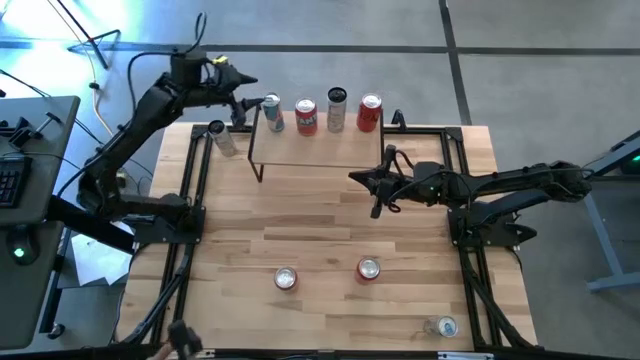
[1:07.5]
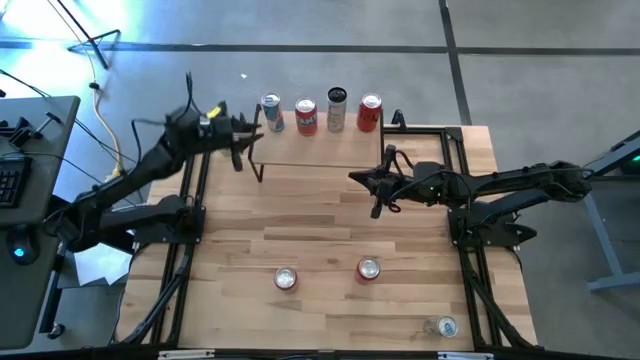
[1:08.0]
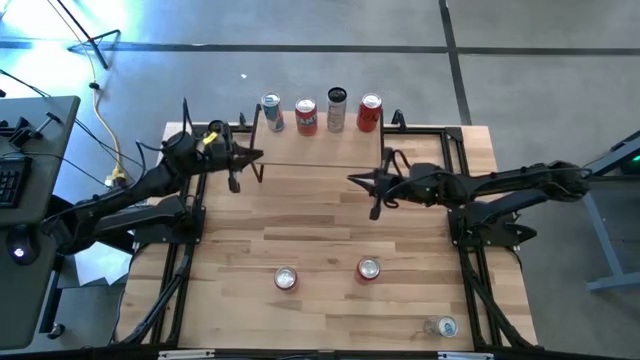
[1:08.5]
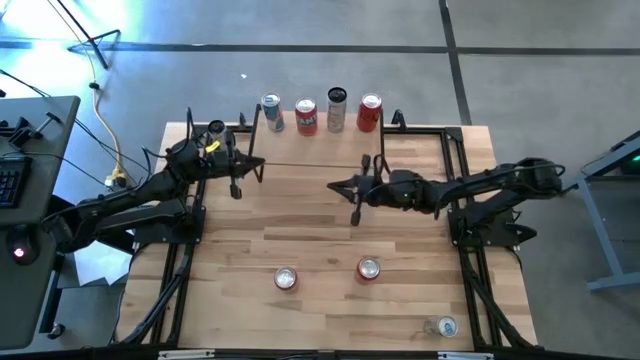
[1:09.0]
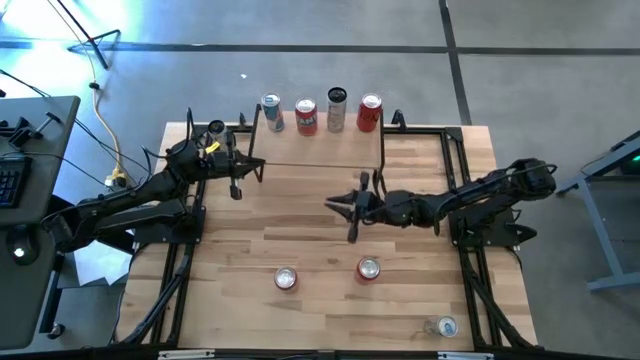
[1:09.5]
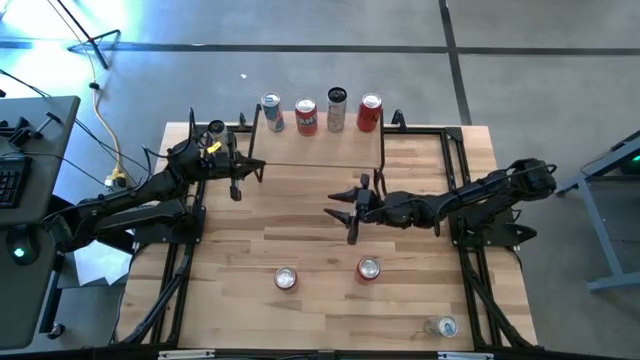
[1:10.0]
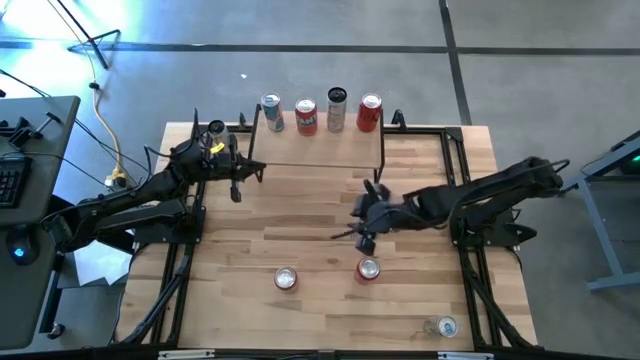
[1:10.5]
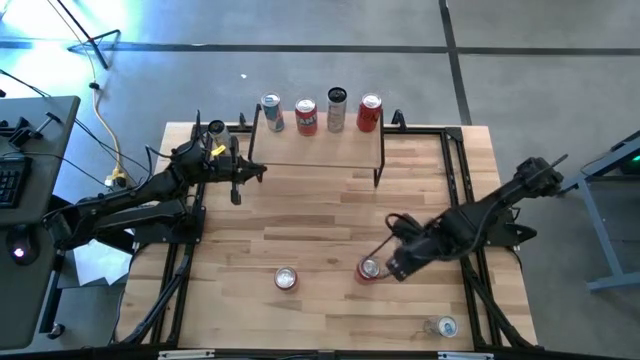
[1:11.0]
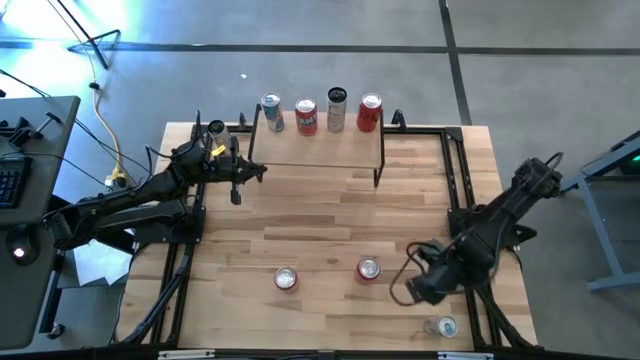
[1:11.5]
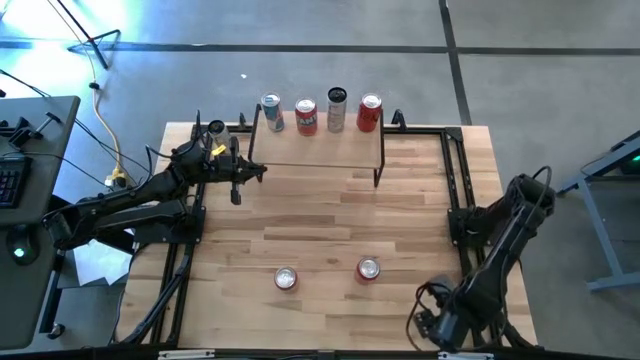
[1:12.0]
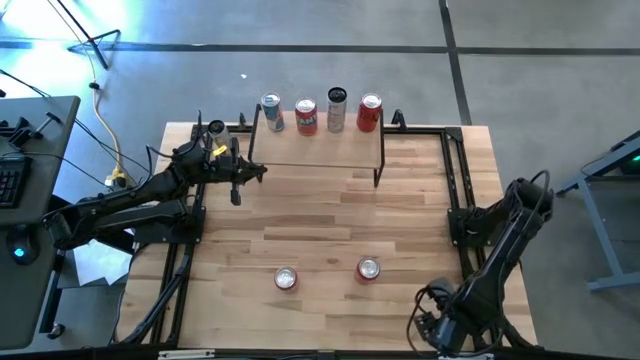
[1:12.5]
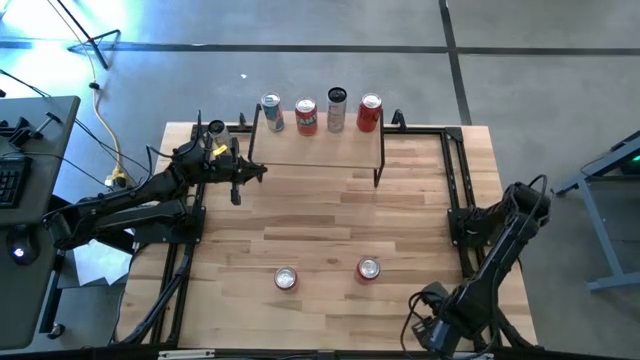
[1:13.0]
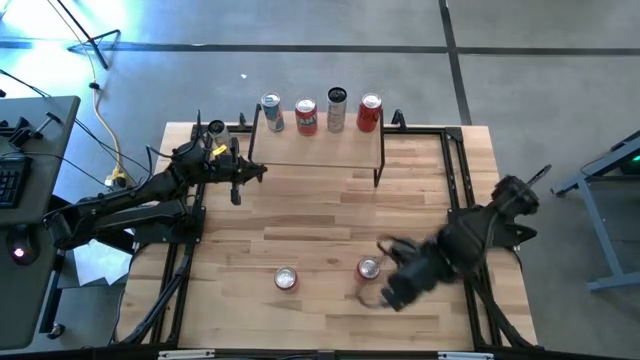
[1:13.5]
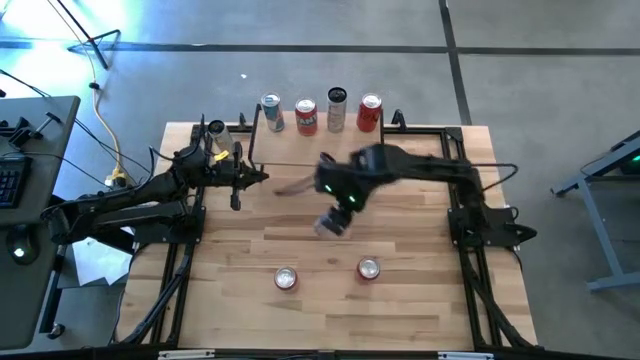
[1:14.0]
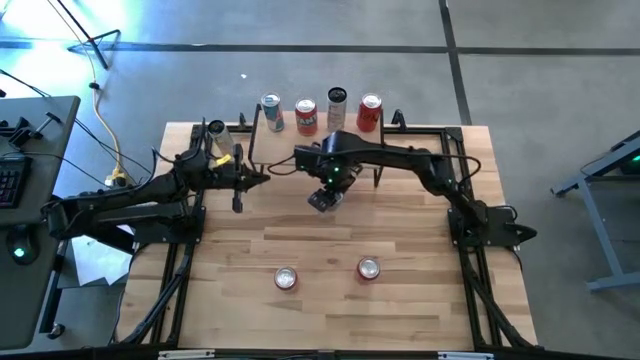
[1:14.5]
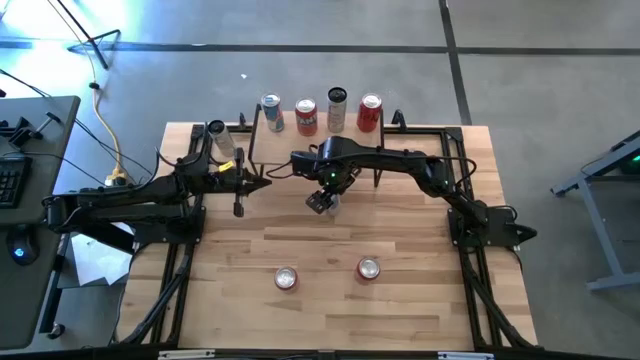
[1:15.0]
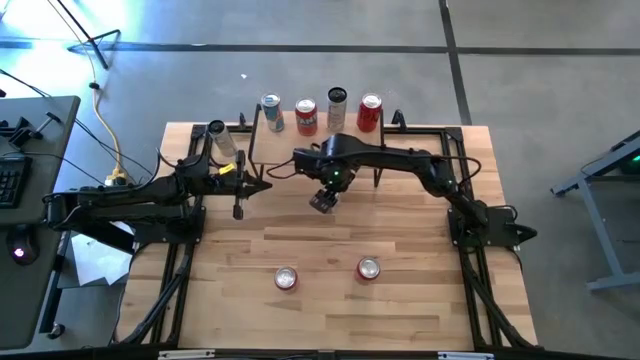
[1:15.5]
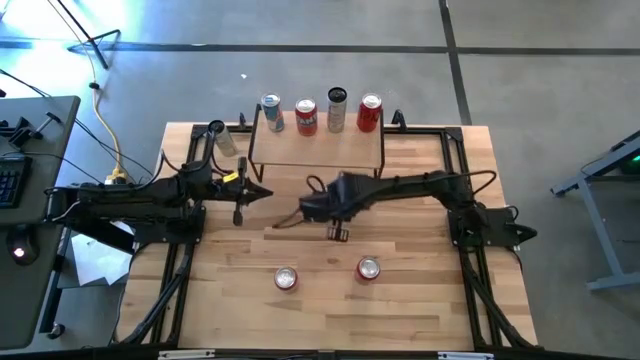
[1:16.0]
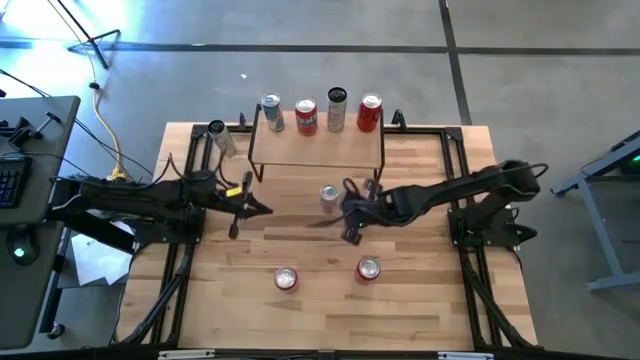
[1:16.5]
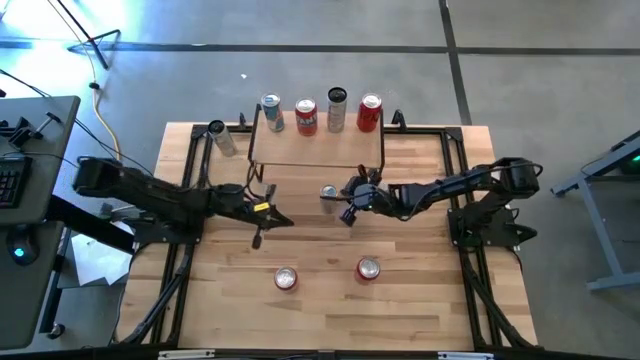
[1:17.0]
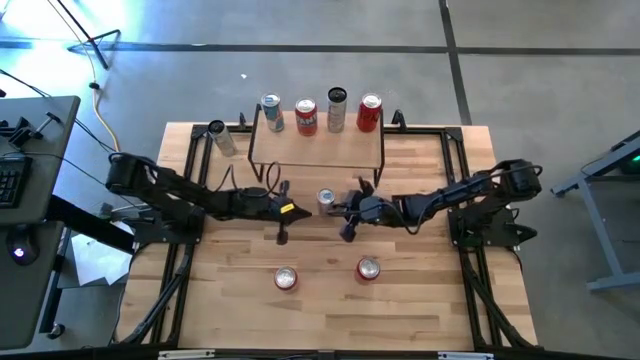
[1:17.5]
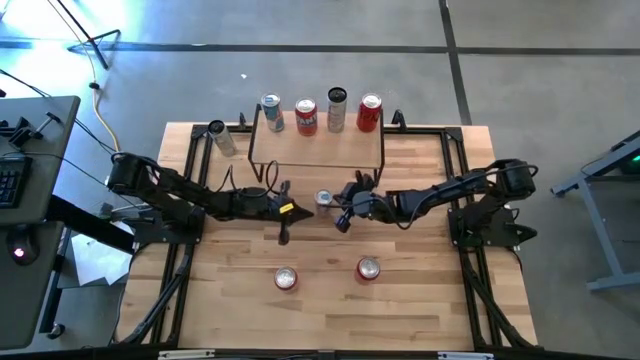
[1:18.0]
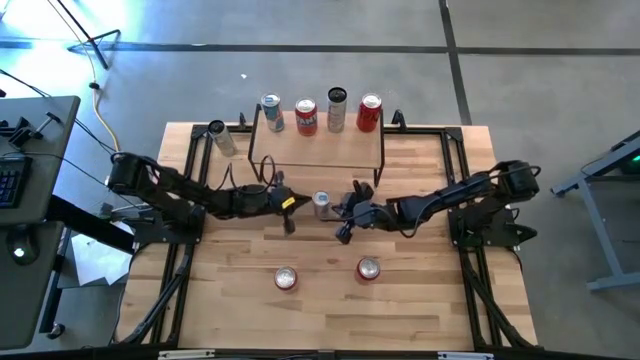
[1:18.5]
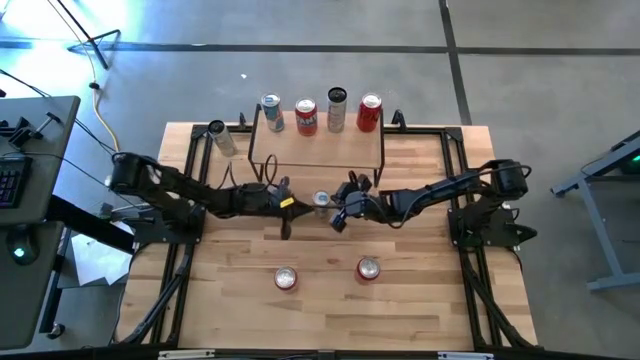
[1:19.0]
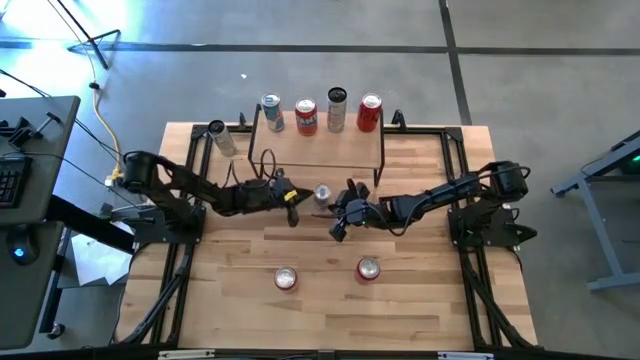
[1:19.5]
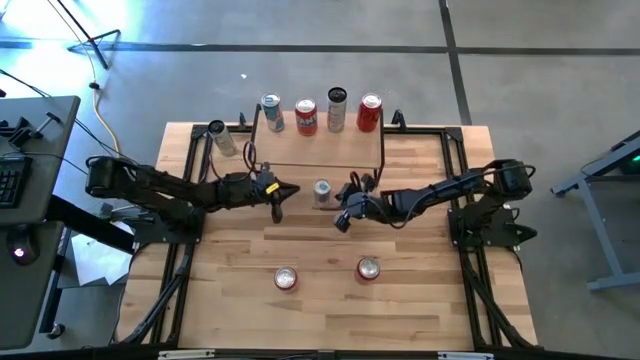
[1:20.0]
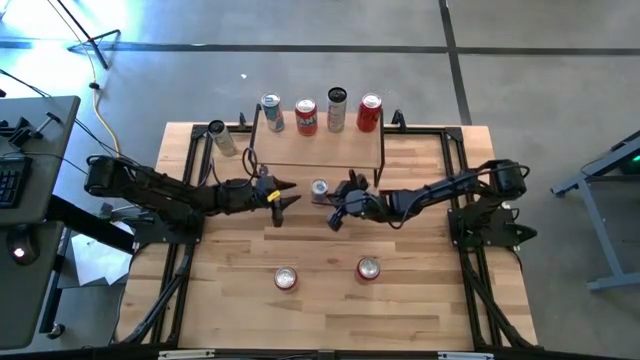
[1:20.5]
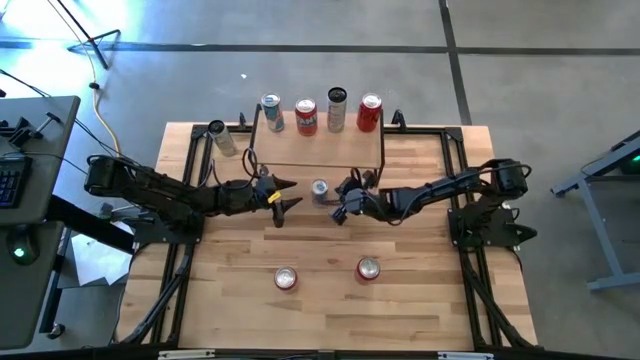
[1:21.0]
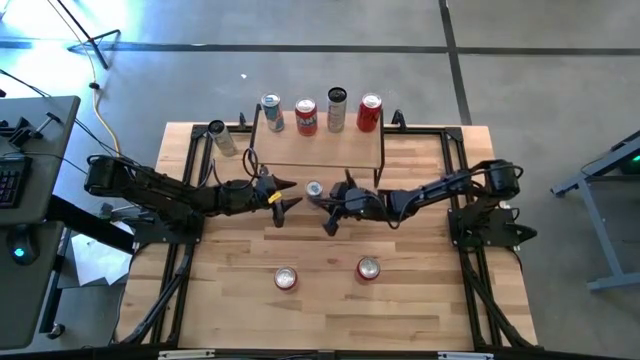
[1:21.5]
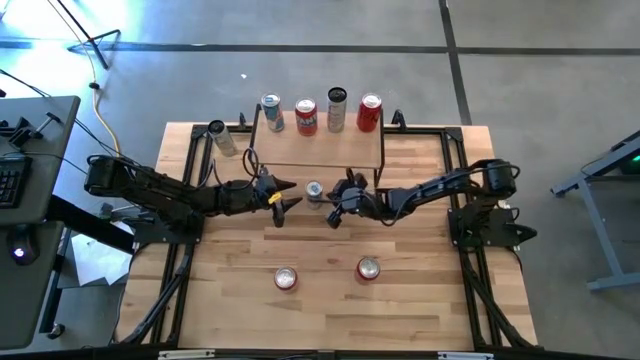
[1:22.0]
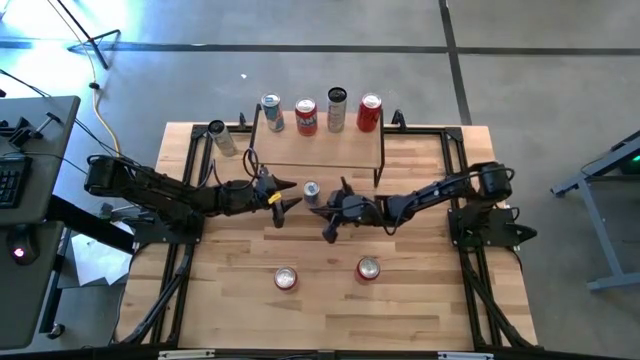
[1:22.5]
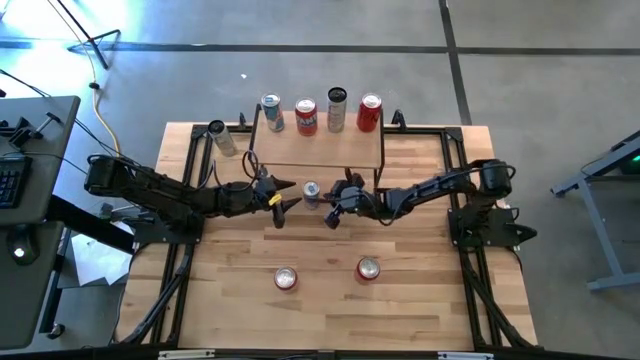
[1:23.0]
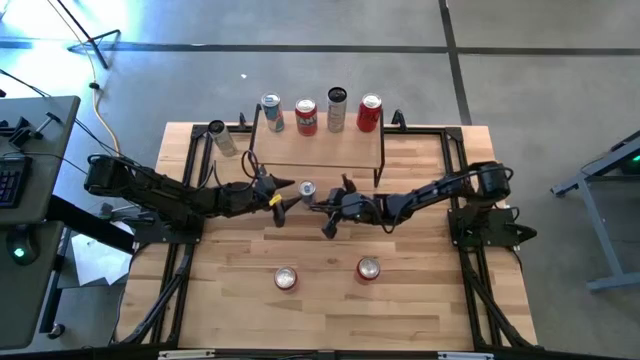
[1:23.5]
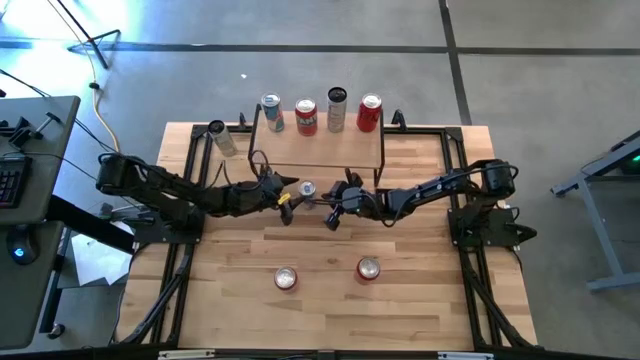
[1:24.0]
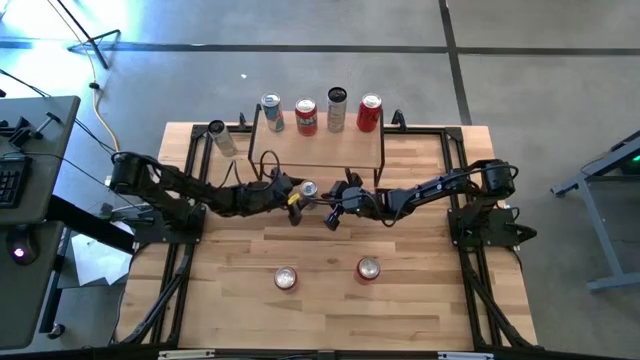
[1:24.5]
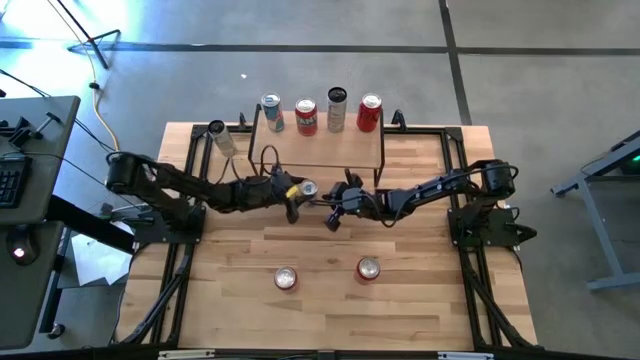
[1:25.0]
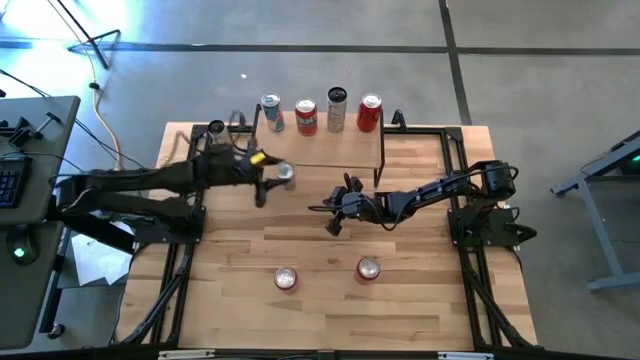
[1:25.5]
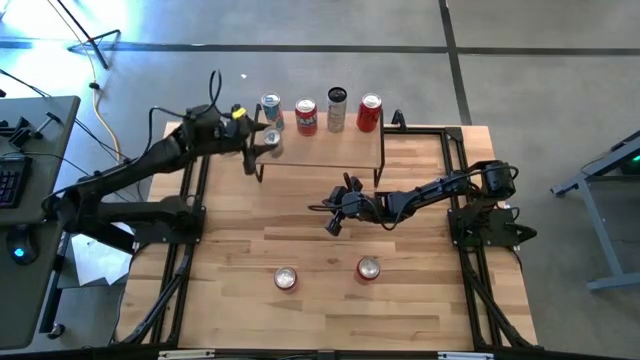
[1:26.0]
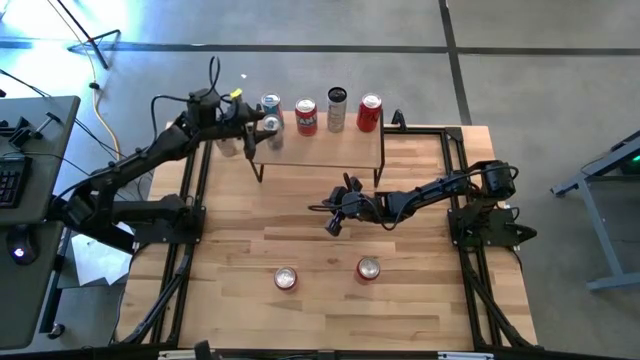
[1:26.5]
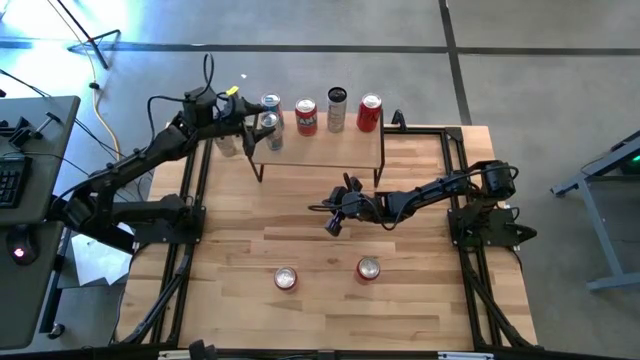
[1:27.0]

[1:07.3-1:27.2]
Task: Place canned beverage on shelf
Put the blue soda can on the shelf aligned with the other blue soda can

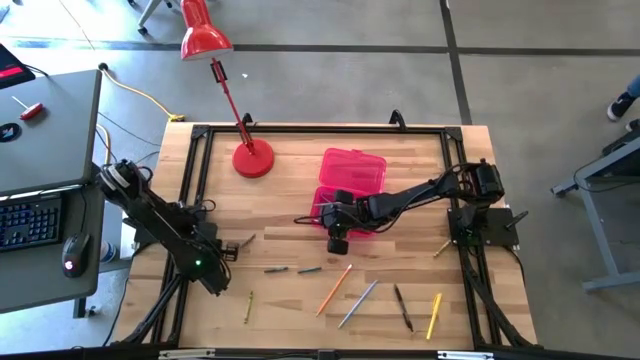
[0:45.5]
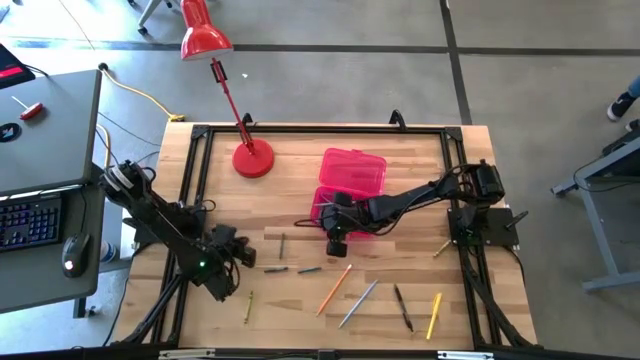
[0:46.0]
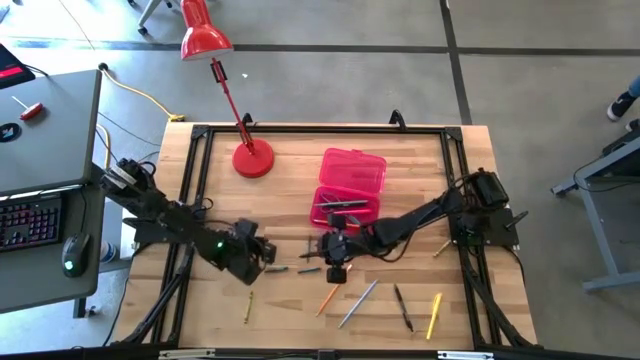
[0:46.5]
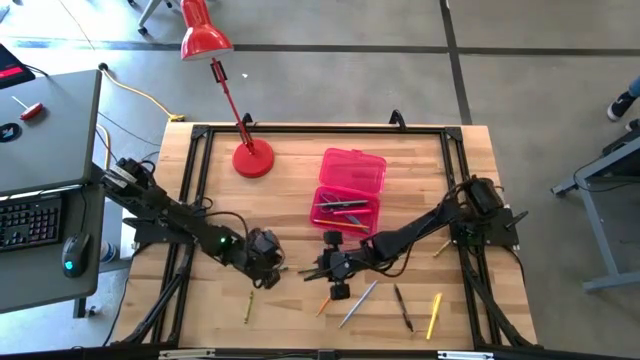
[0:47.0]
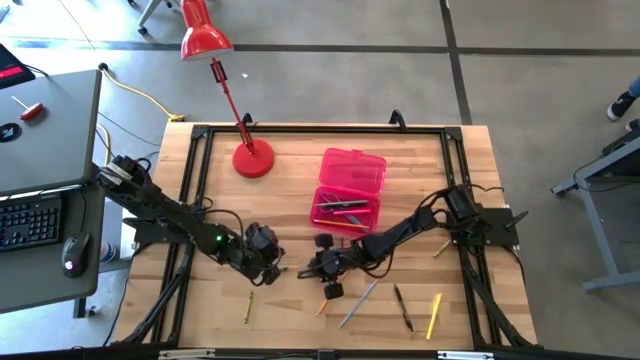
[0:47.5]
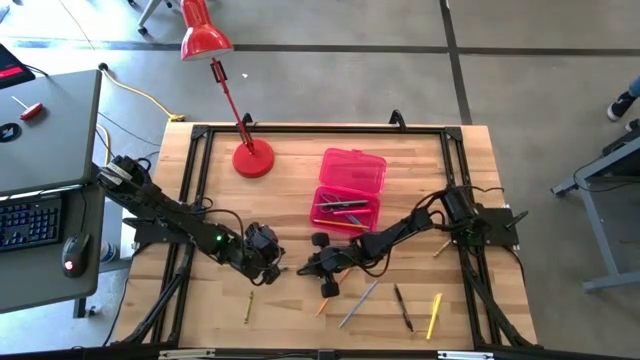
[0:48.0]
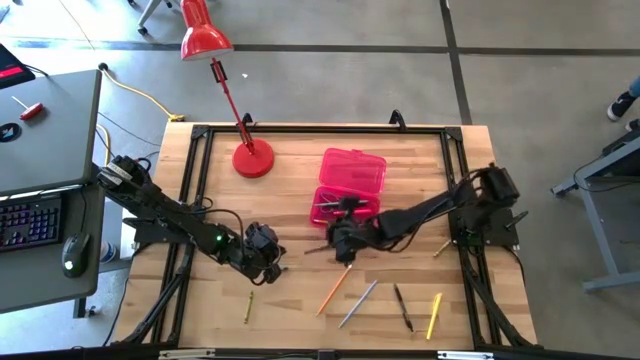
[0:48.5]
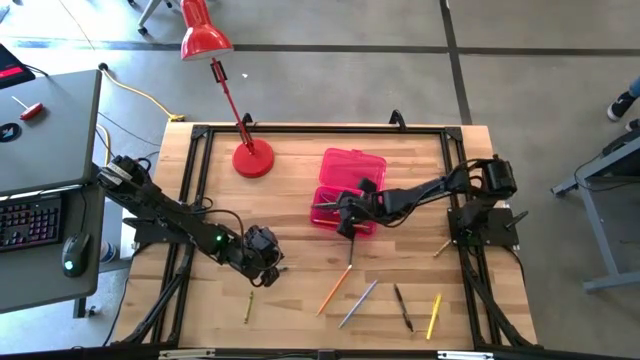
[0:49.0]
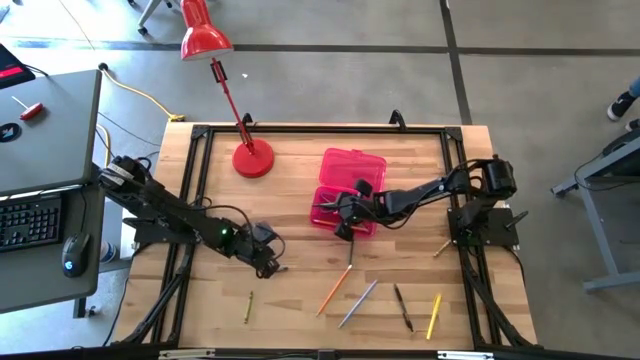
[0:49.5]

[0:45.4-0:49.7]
Task: Pick & place school supplies into a supply box
Put the middle dark green crayon into the red supply box
